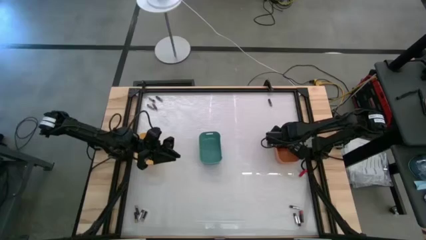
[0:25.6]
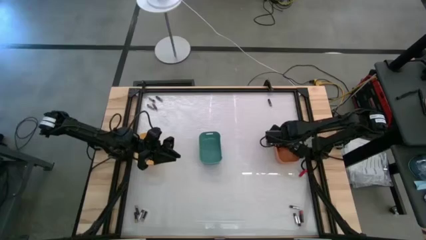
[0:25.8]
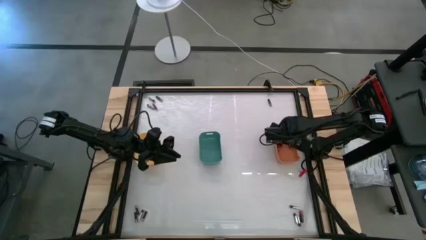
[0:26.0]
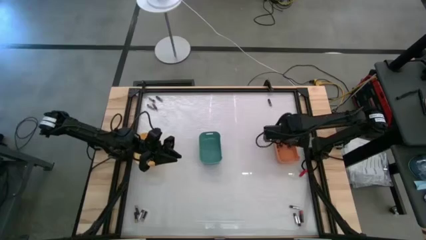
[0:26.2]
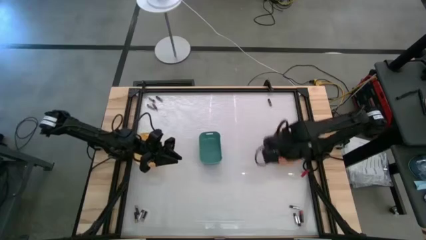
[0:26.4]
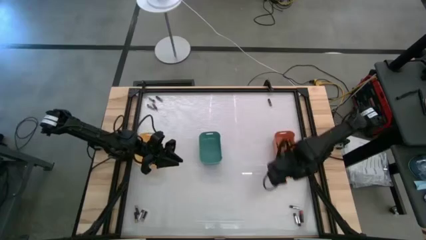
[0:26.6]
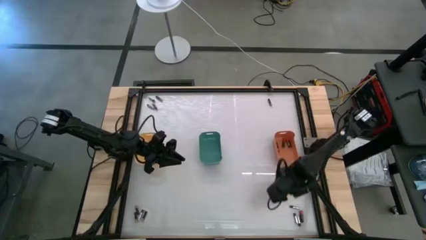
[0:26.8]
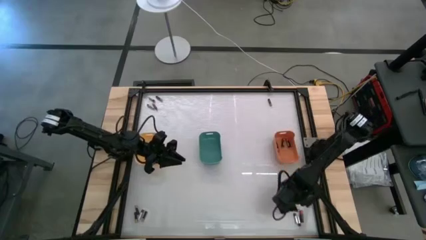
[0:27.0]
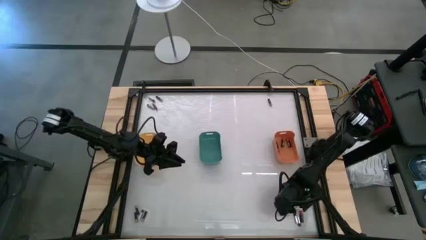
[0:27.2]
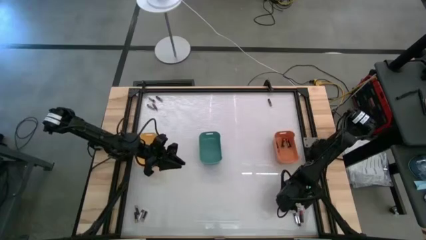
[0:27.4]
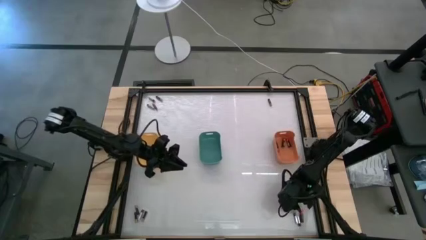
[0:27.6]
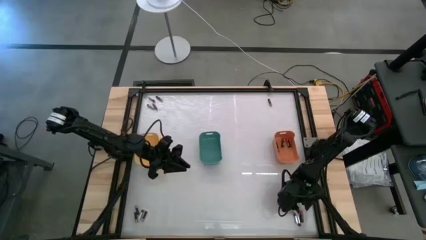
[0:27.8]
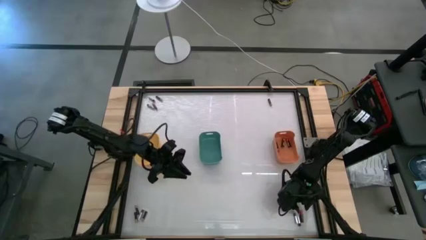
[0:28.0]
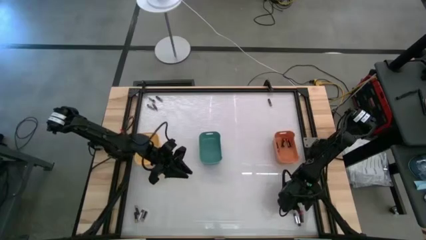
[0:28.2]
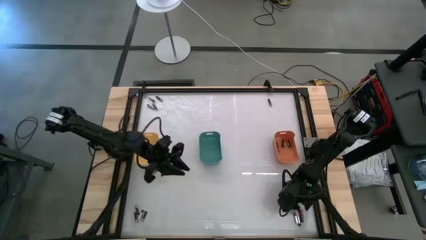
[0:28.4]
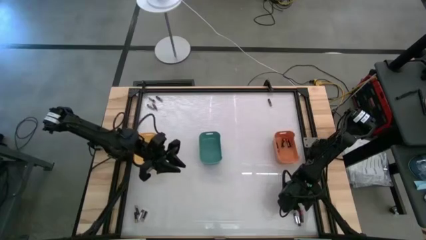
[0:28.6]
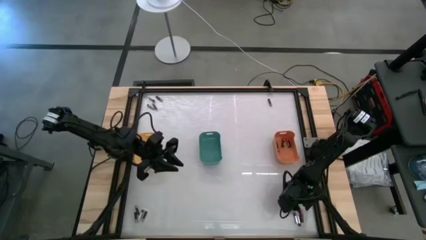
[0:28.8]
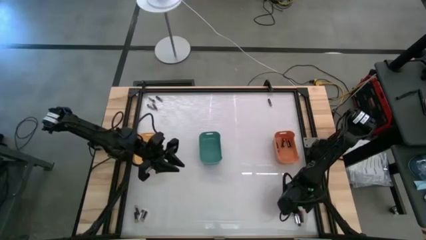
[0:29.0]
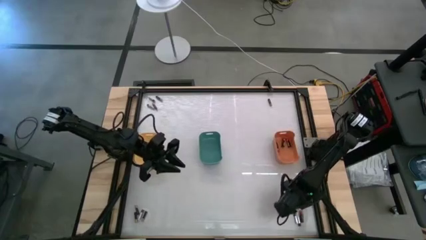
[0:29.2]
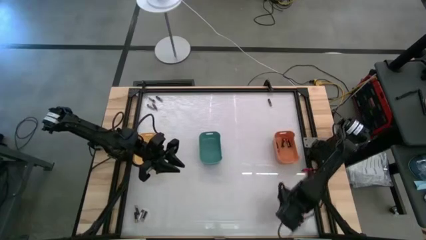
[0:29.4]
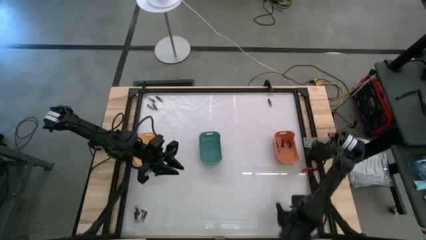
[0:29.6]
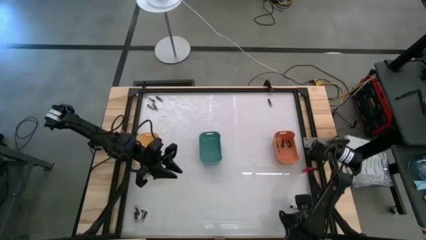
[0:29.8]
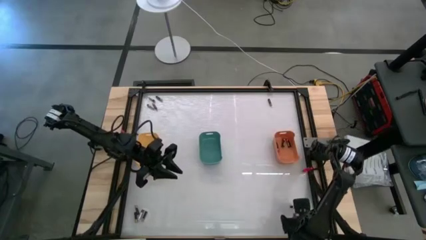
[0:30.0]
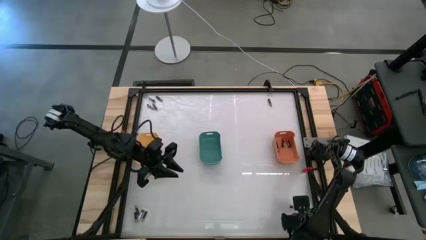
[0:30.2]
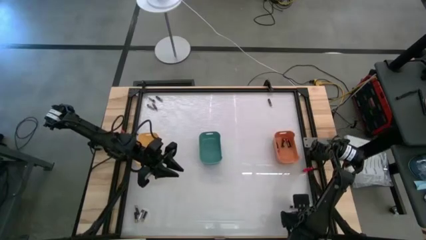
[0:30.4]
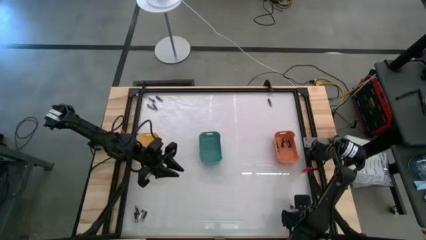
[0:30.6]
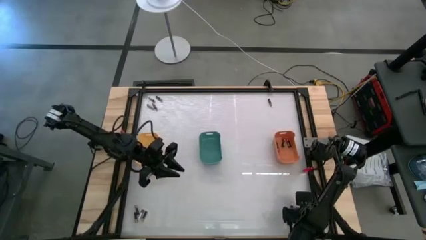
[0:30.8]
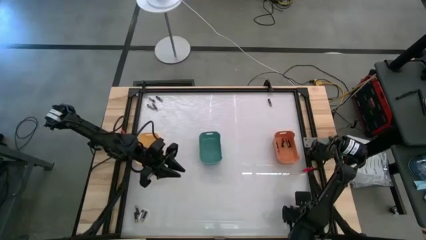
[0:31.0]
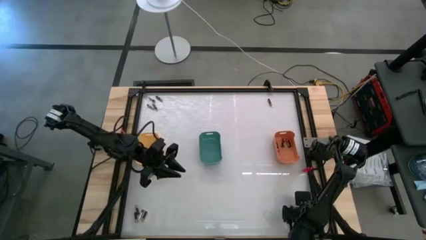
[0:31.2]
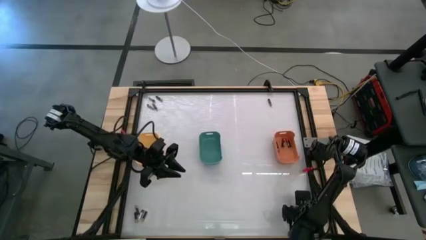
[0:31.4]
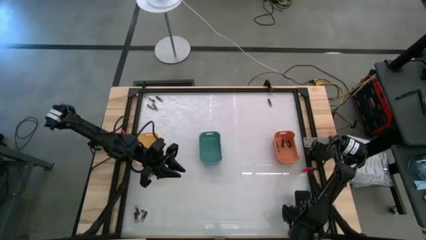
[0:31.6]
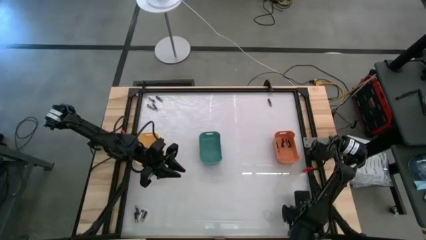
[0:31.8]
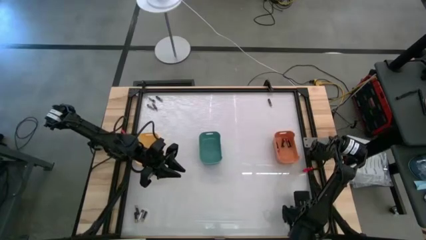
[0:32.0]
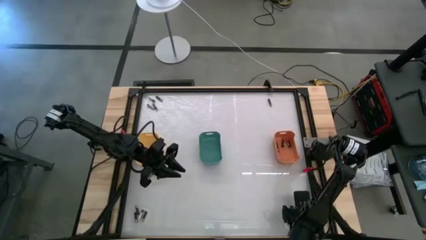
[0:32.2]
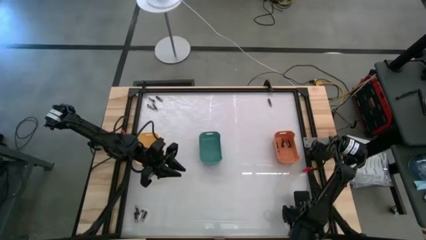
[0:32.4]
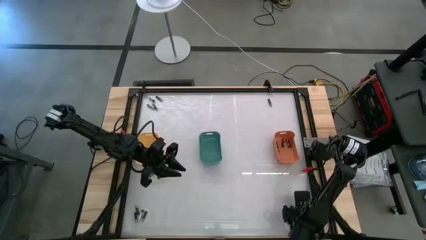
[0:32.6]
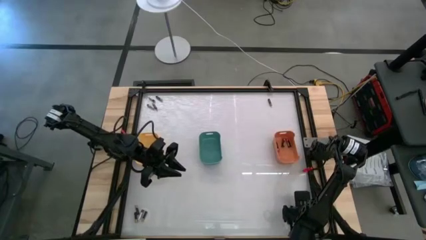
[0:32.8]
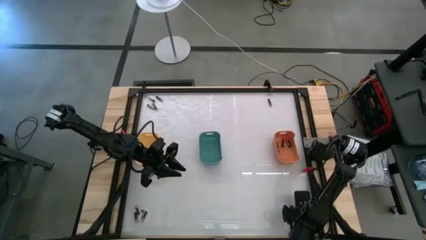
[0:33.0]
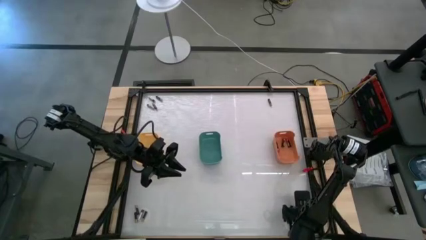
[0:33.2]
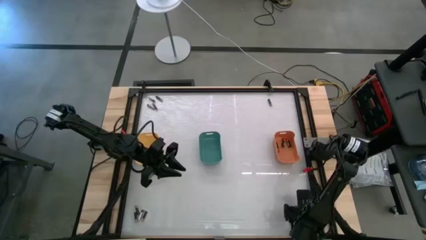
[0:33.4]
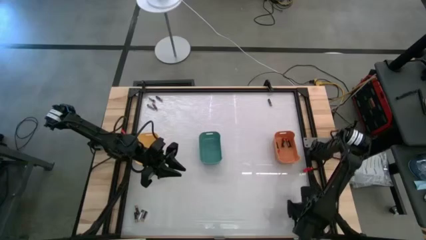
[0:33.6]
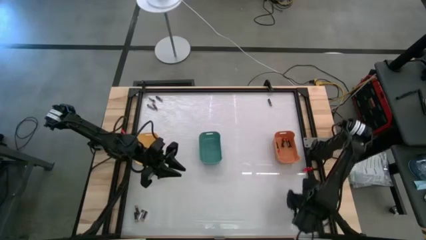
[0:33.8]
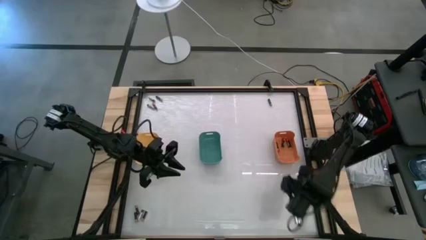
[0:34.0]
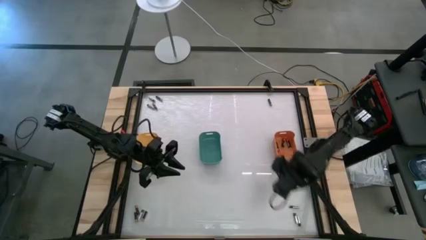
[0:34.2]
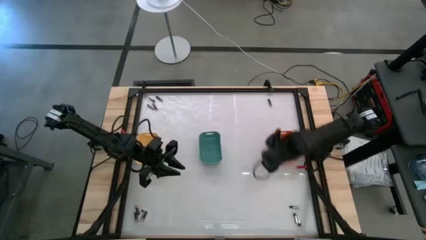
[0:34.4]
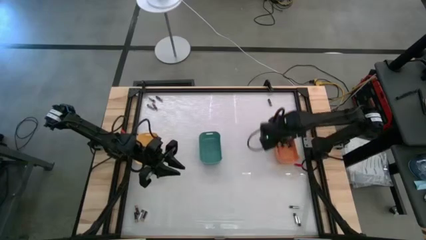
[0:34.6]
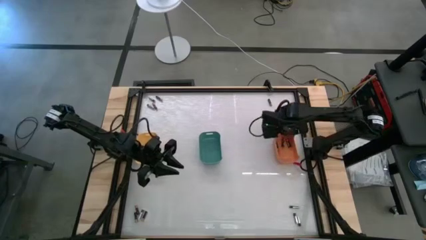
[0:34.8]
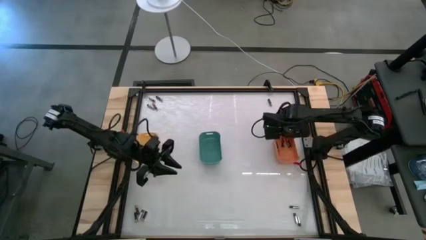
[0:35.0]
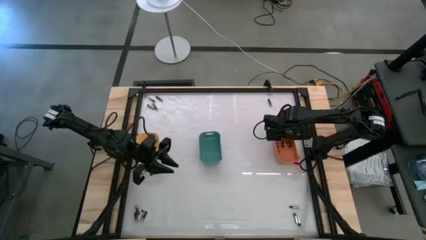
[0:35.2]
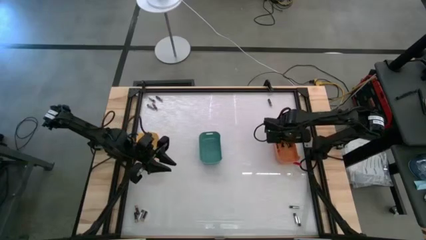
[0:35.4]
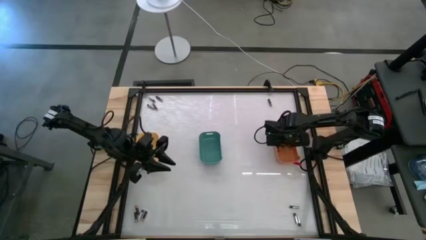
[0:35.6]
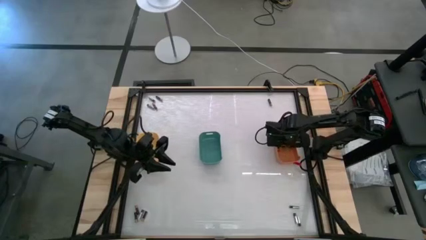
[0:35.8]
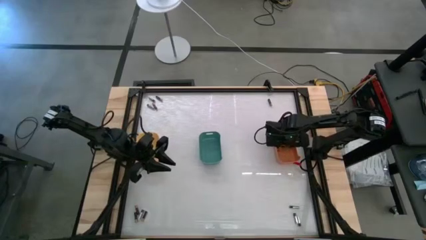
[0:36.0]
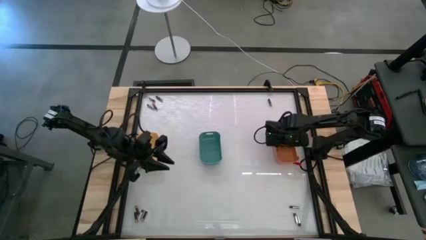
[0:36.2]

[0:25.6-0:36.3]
Task: Sort batteries
Put the red battery into the orange bin

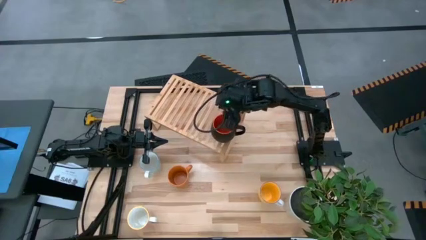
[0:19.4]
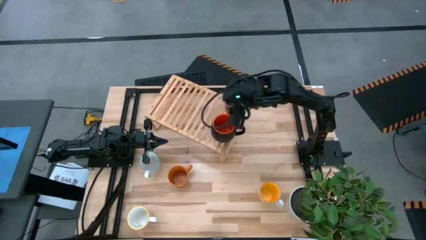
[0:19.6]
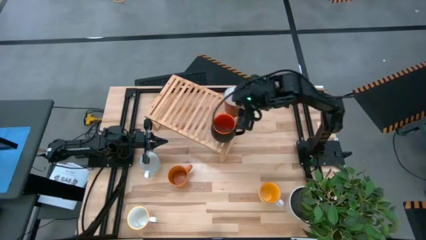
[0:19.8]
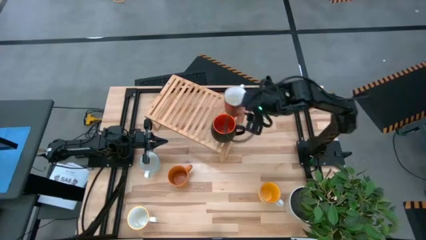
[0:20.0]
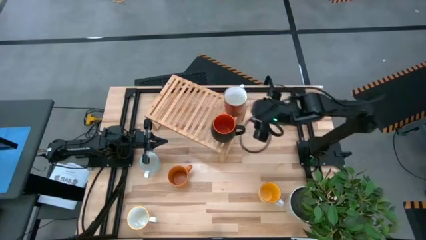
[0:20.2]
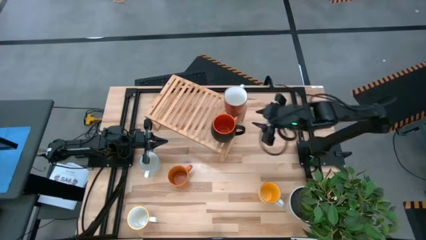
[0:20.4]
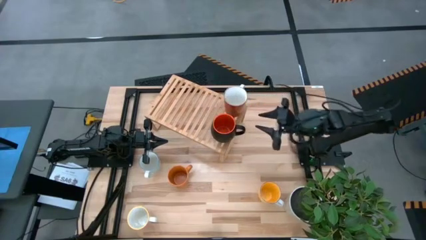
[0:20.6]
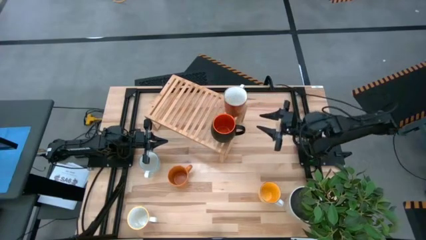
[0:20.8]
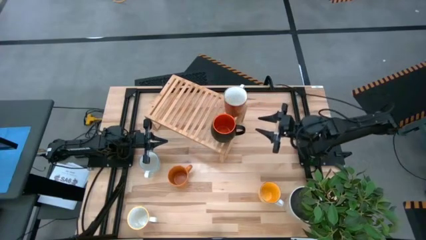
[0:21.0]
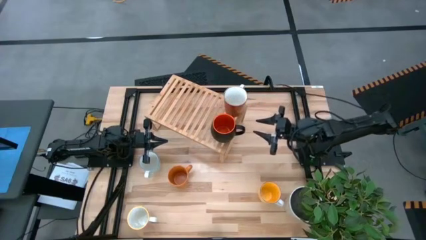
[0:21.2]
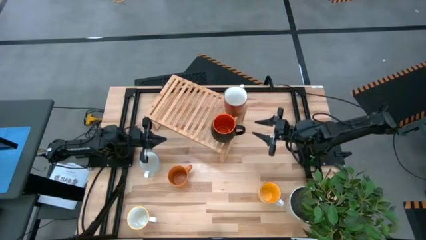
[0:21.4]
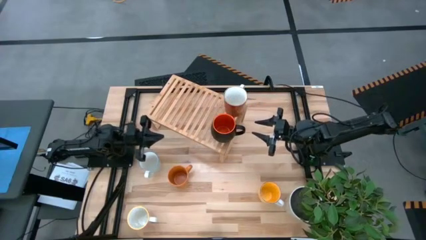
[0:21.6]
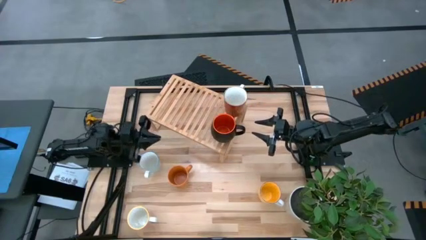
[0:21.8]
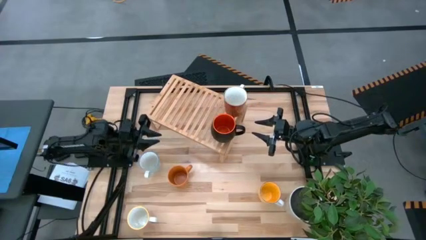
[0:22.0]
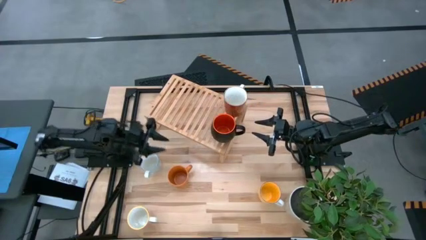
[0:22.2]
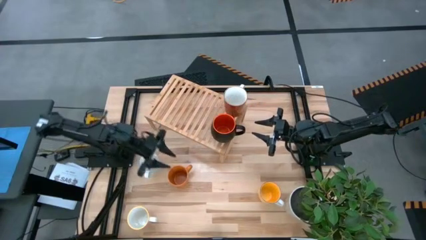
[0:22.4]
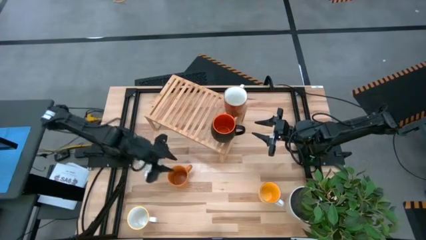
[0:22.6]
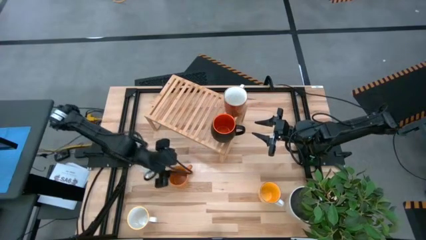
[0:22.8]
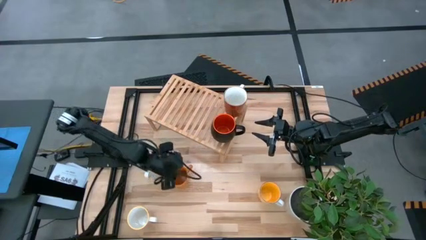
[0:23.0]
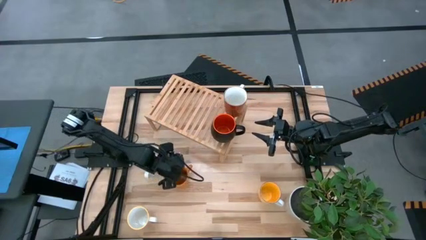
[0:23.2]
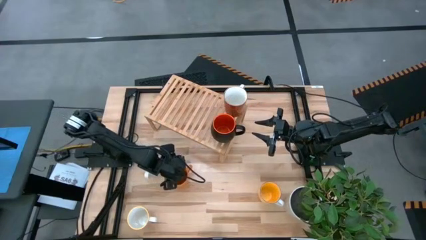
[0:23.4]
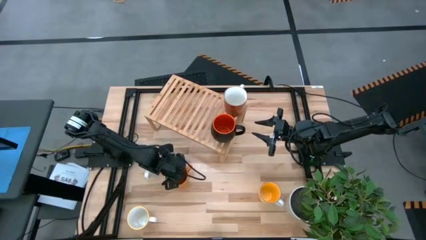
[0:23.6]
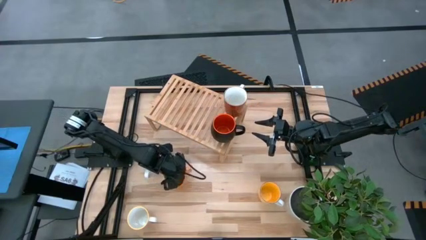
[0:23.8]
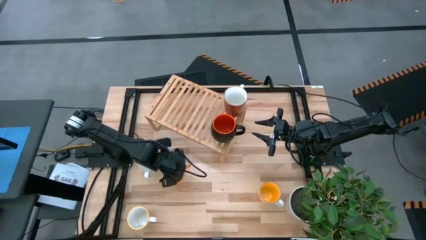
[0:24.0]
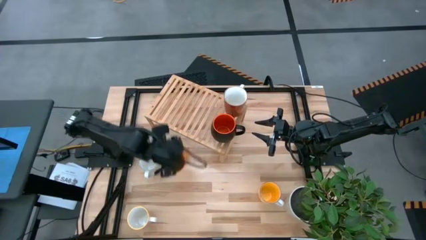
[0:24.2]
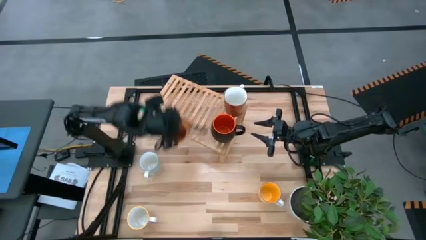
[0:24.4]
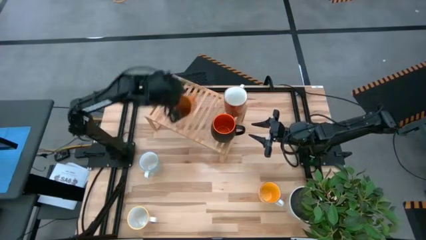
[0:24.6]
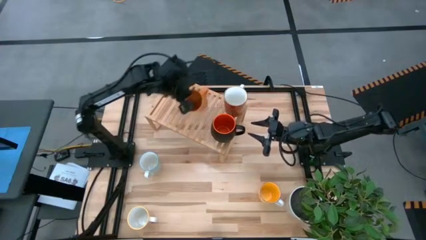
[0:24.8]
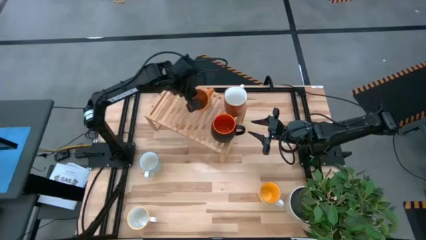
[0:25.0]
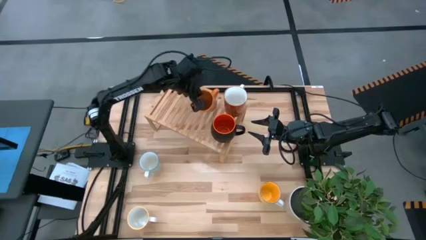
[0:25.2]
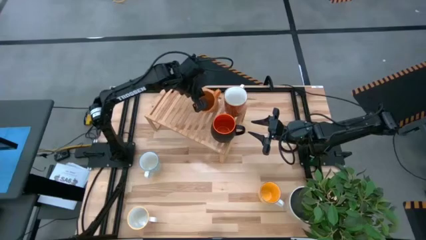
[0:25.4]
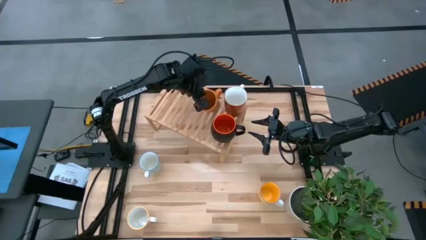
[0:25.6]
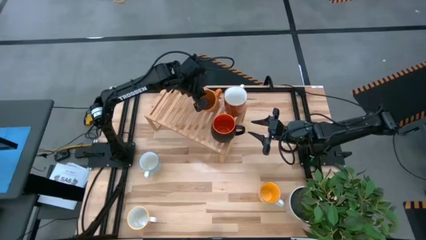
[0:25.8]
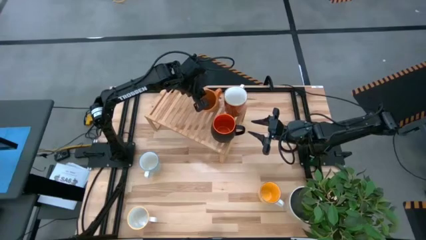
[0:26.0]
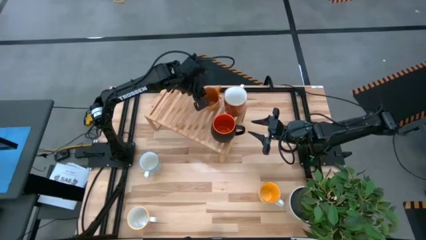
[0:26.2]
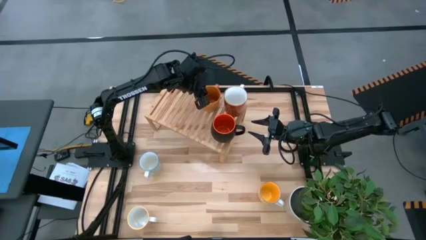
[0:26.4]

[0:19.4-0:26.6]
Task: Place coffee mugs
Put the orange mug on the shelf
